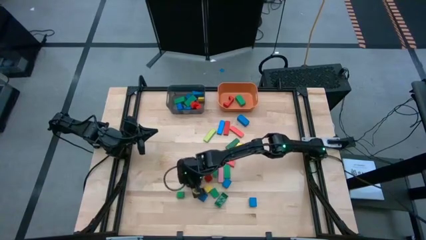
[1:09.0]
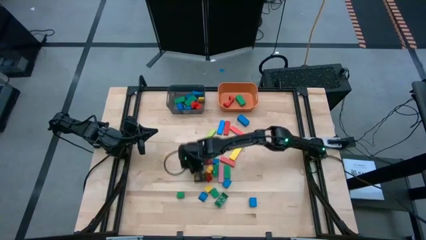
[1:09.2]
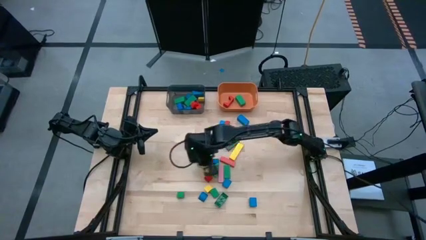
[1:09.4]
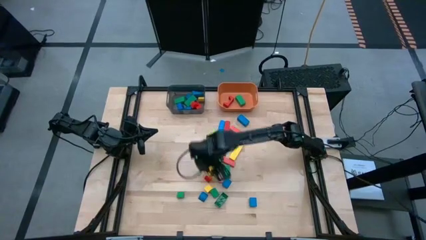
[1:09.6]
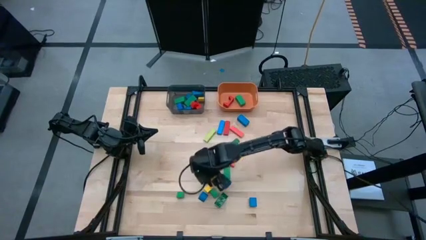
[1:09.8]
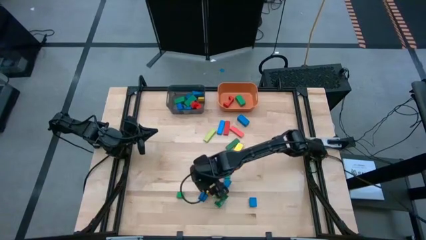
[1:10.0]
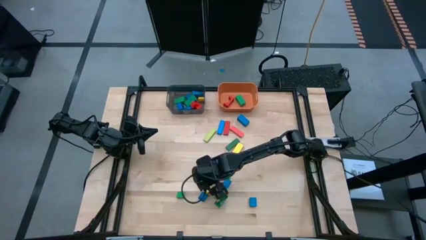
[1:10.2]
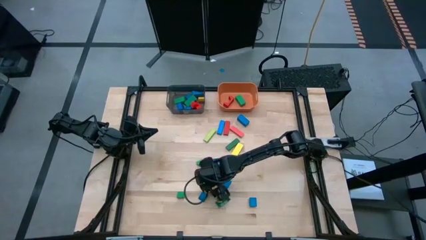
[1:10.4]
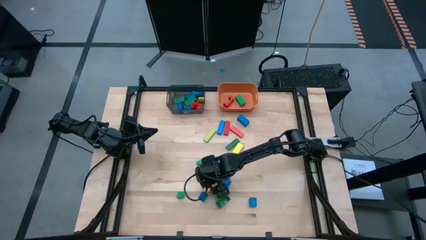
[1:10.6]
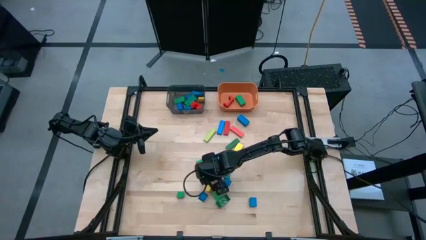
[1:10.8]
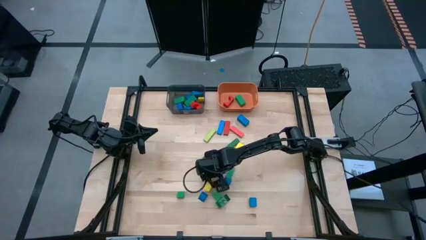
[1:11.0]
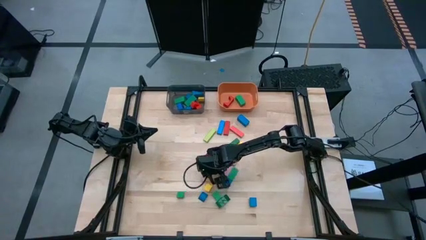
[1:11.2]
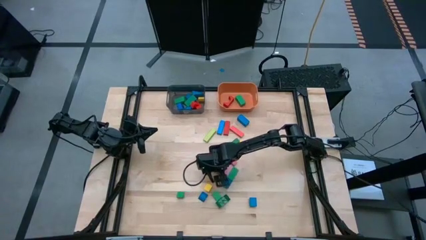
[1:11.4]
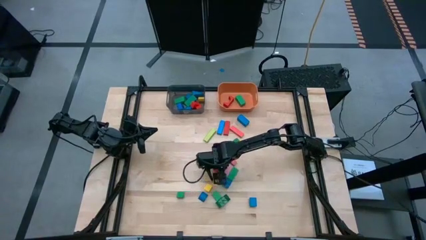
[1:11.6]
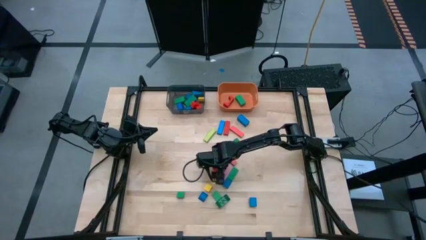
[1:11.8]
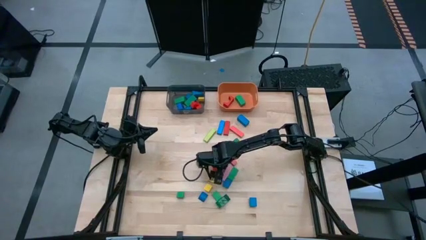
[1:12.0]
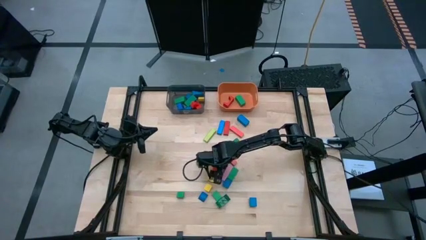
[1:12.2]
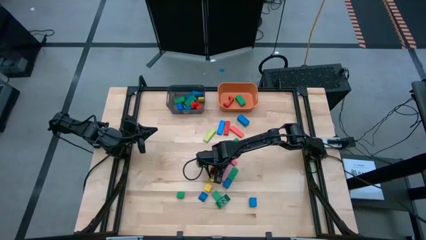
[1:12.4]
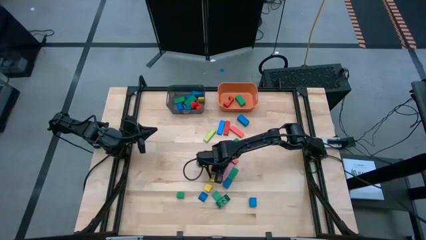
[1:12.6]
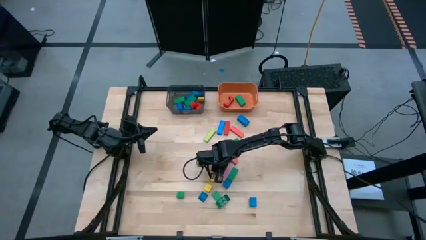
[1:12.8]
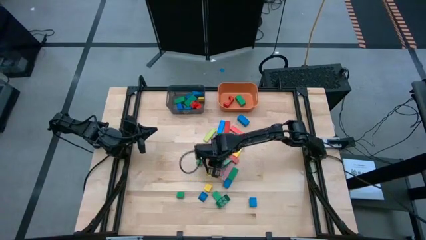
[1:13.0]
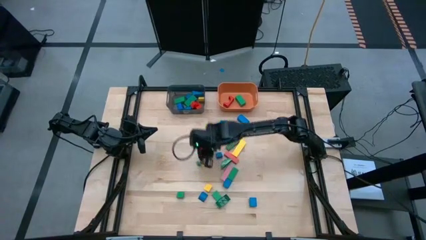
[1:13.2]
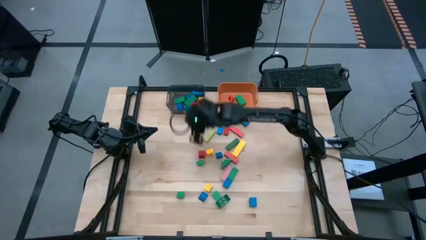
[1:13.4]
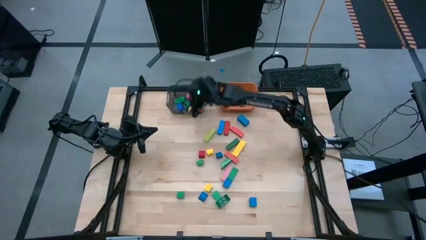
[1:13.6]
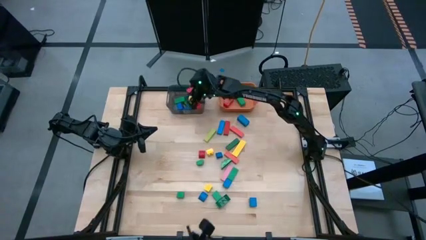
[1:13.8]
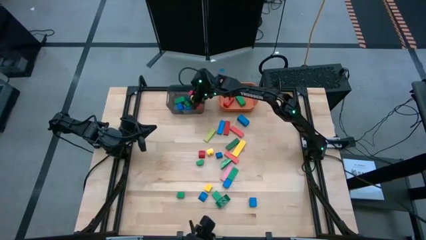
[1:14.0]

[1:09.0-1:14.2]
Task: Sort blocks by size
Put the small red block into the black bin

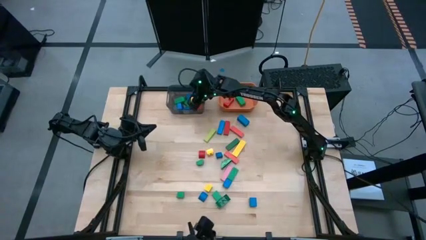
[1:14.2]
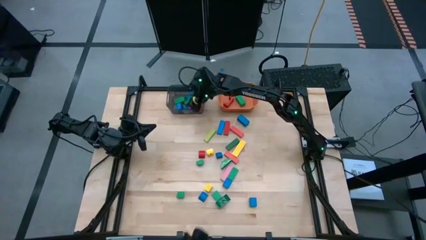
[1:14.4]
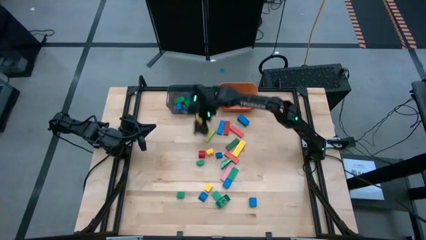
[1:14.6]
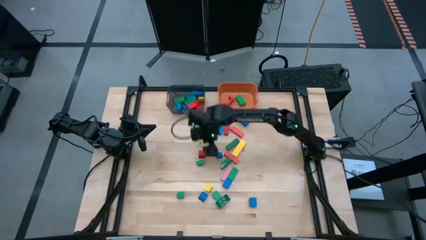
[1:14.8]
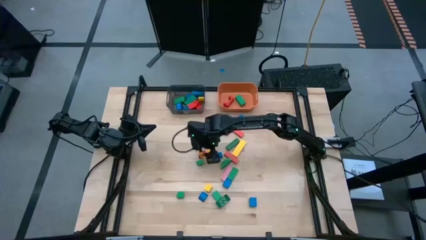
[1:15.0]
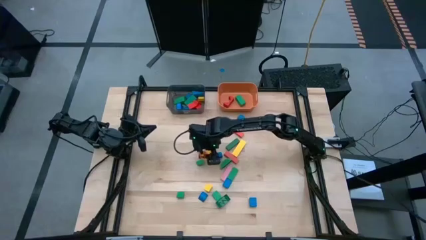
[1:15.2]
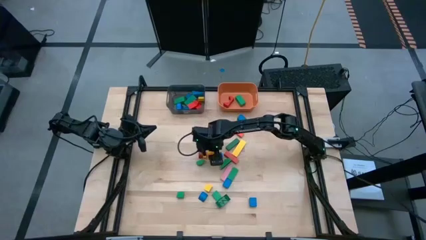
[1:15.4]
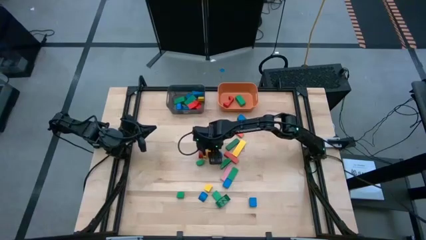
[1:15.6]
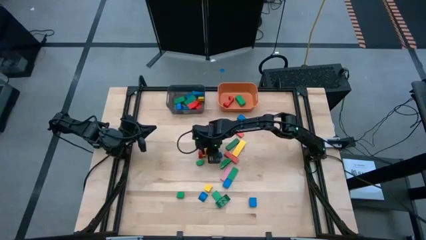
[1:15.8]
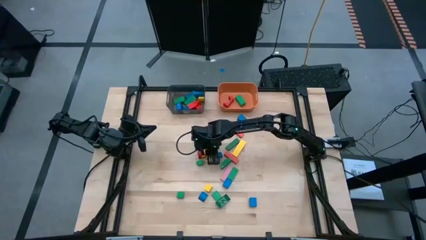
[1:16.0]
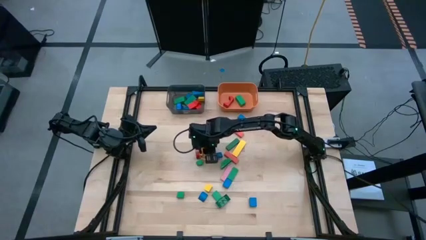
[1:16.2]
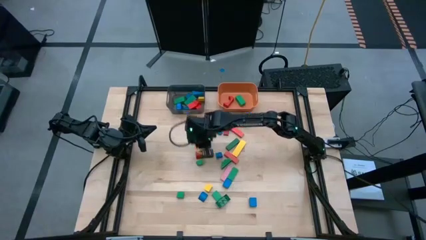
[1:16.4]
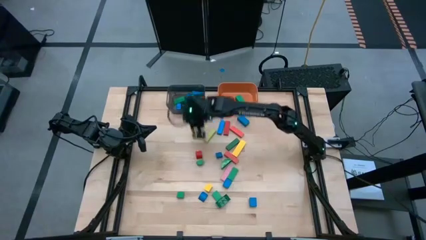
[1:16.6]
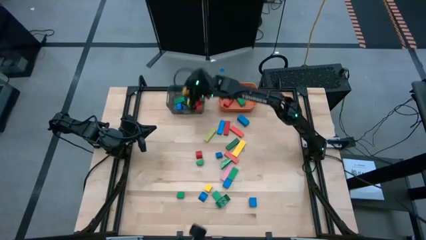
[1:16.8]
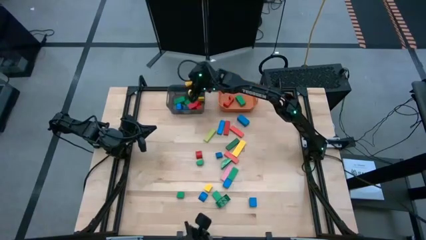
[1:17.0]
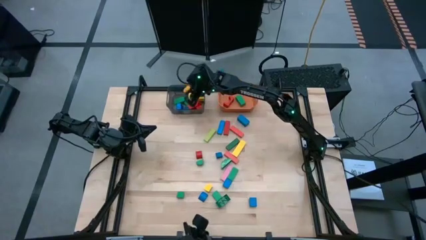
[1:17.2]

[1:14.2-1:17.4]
Put the small yellow game piece into the black bin

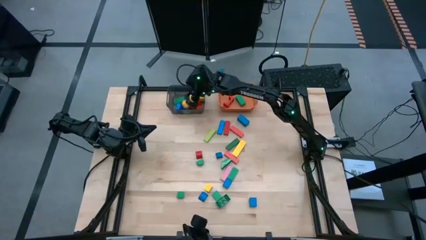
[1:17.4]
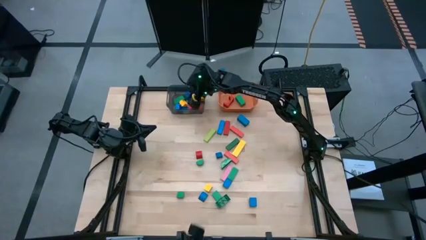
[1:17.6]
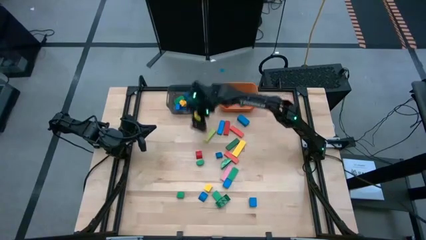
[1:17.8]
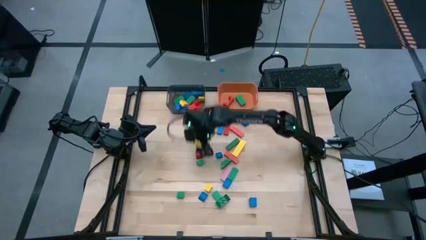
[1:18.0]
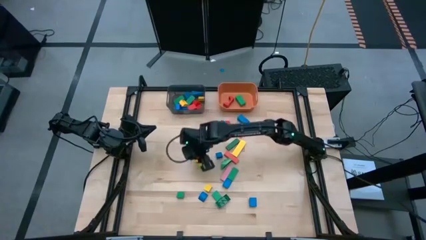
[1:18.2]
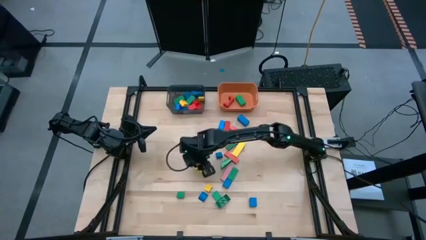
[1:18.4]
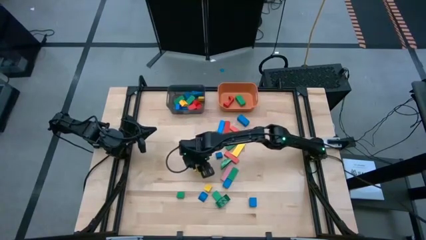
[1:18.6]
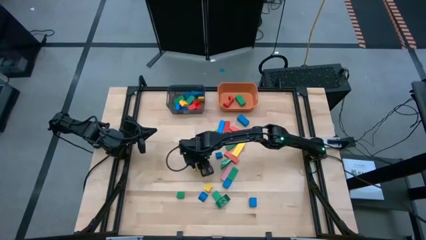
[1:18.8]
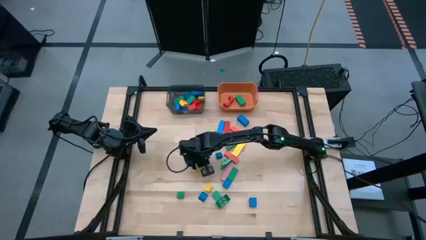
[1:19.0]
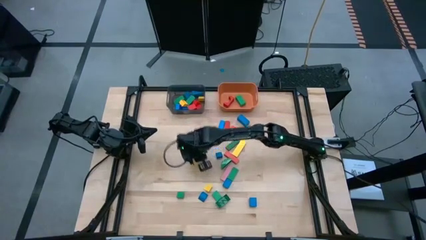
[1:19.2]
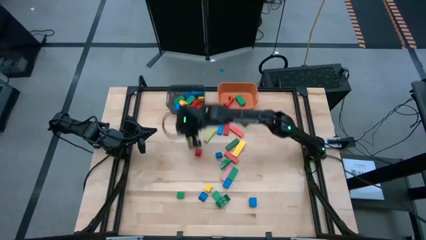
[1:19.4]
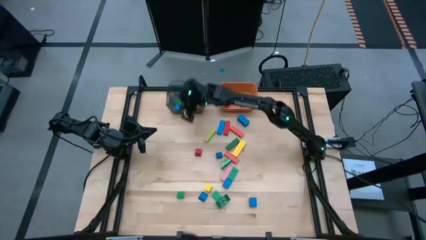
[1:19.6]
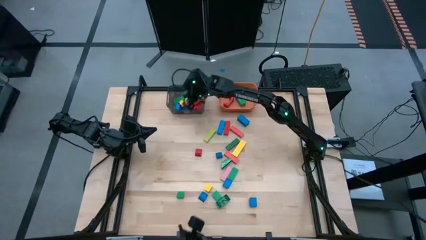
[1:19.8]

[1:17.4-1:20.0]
Put the small green block into the black bin

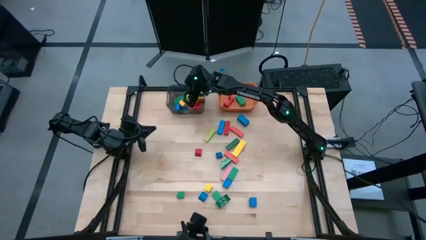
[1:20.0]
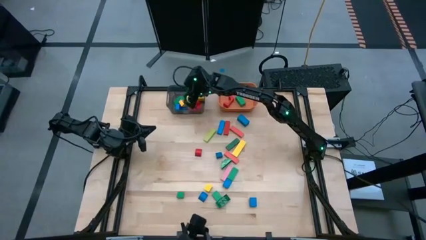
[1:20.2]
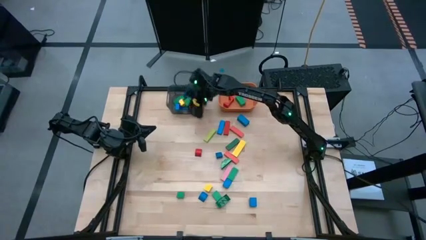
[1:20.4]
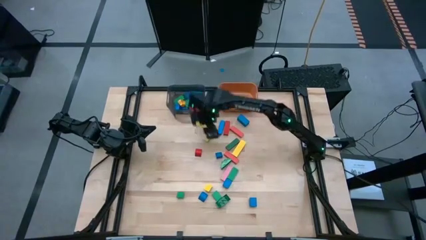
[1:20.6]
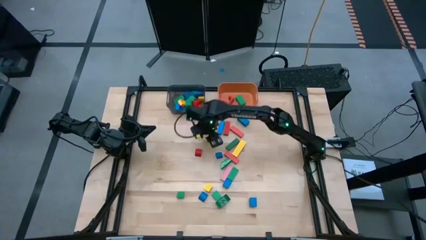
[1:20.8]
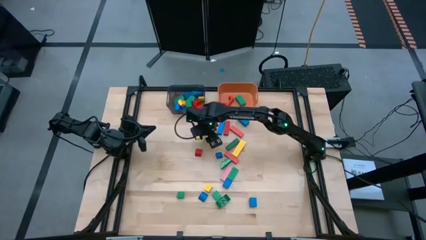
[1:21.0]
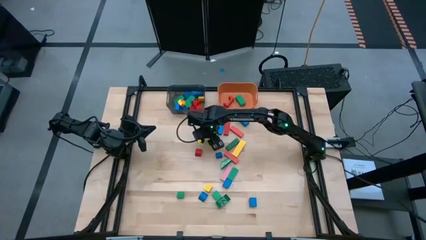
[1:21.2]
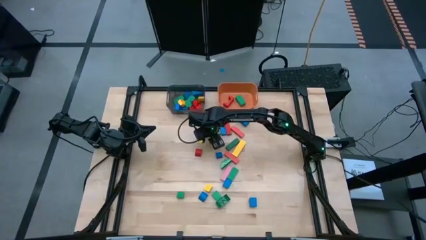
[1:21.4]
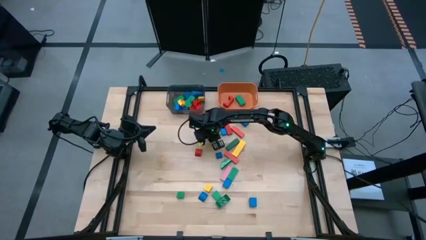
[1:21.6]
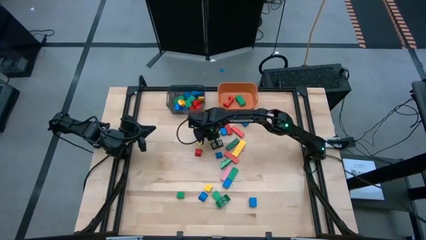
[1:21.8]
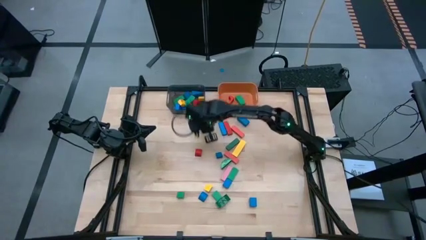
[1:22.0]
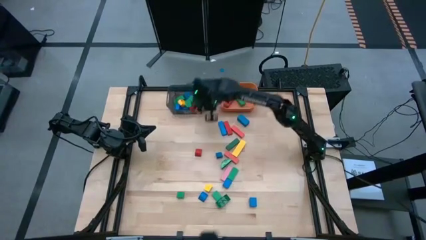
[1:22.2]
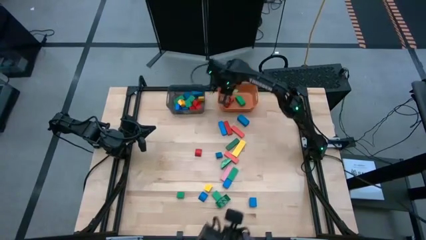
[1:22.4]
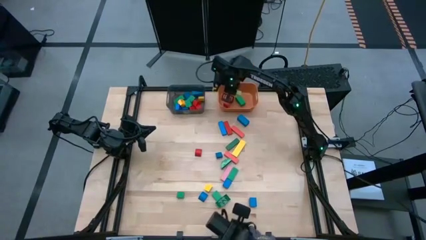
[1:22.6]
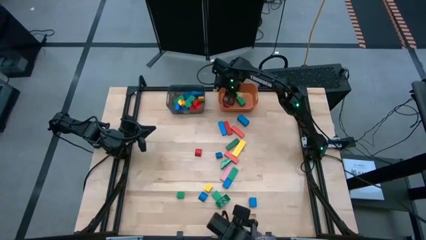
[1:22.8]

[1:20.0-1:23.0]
Put the small green block into the orange bin

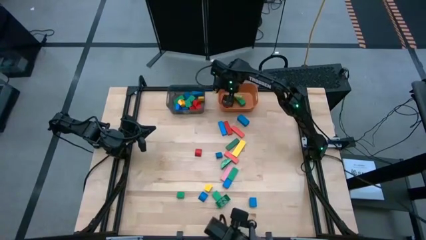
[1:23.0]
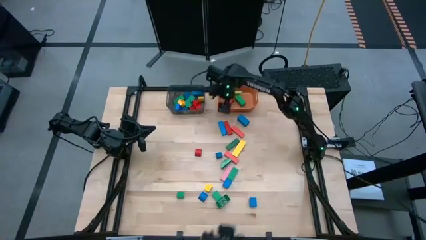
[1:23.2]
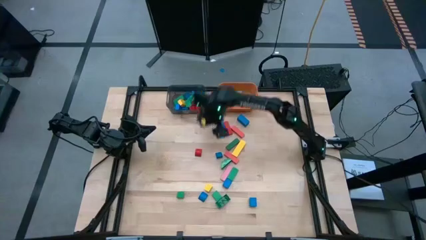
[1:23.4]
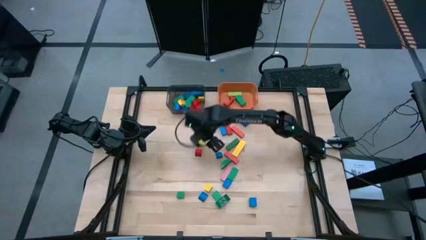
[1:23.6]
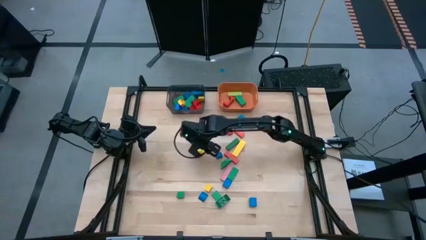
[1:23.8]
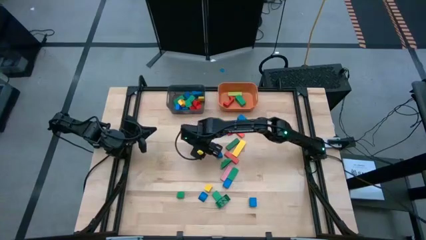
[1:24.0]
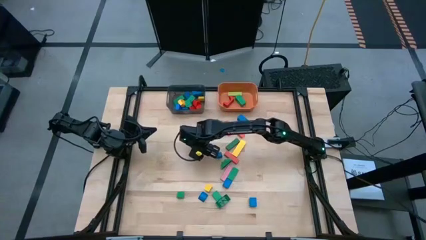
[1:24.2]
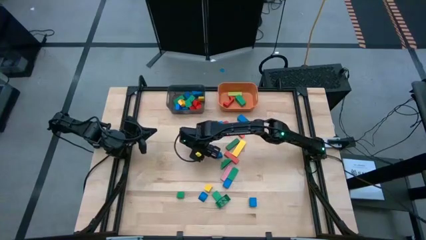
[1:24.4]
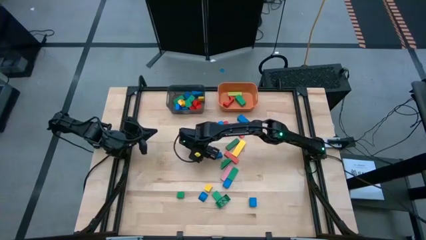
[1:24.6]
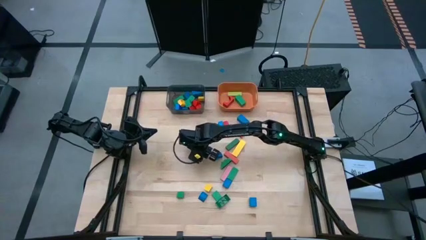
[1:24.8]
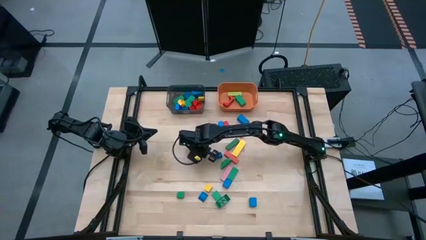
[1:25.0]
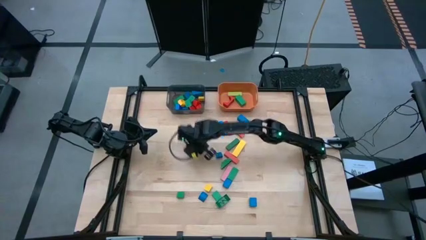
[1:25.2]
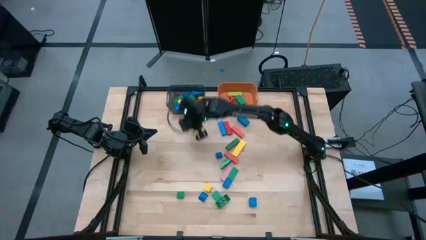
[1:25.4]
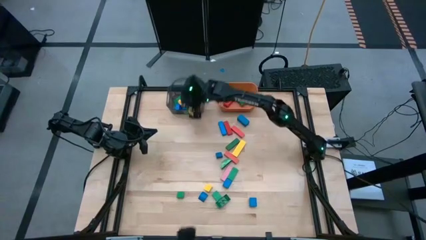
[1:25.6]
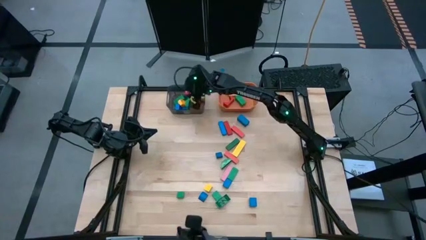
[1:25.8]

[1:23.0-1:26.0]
Put the small red block into the black bin
